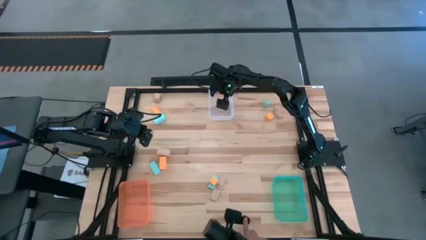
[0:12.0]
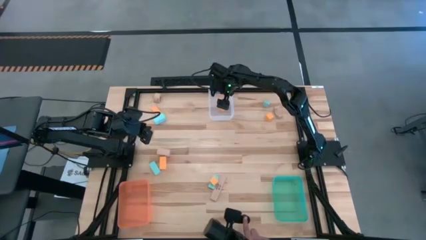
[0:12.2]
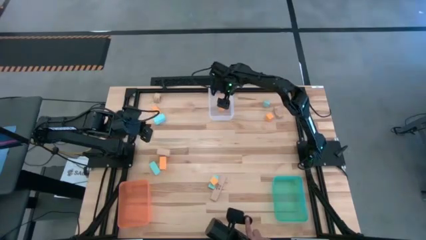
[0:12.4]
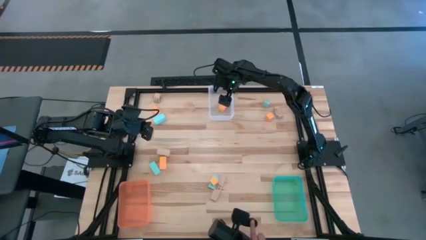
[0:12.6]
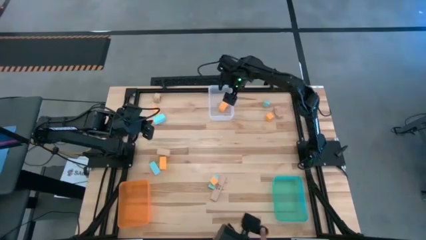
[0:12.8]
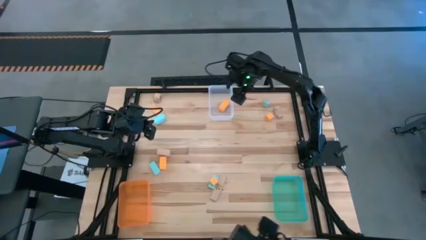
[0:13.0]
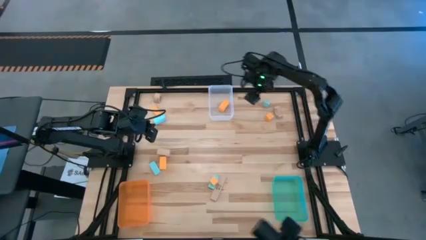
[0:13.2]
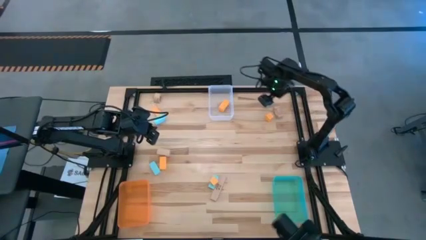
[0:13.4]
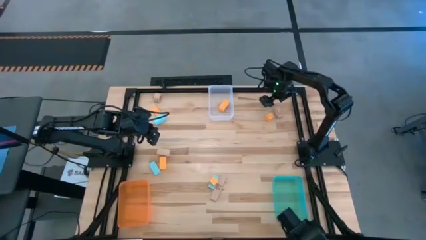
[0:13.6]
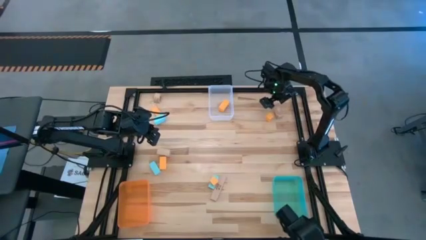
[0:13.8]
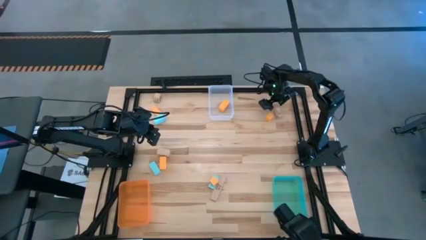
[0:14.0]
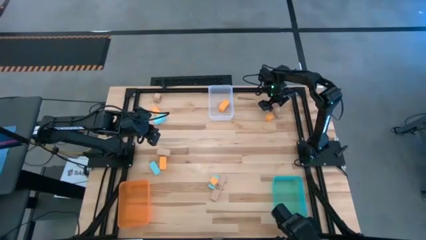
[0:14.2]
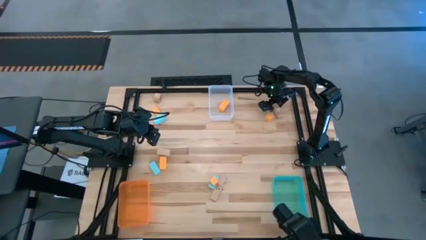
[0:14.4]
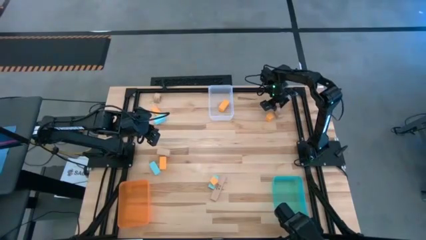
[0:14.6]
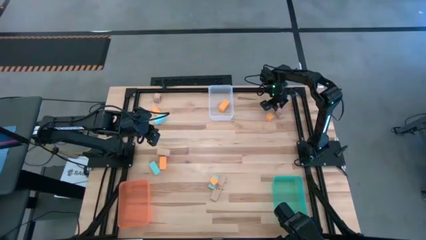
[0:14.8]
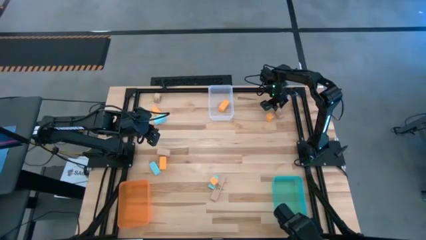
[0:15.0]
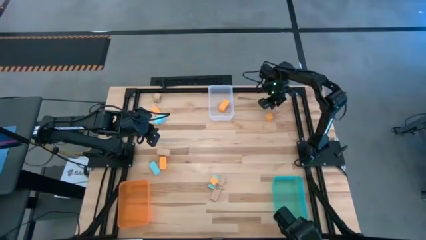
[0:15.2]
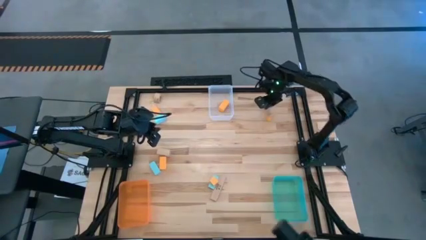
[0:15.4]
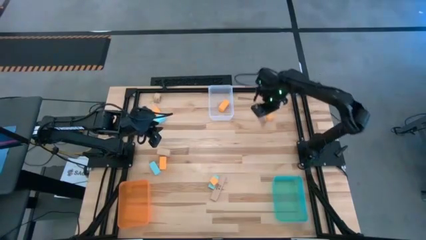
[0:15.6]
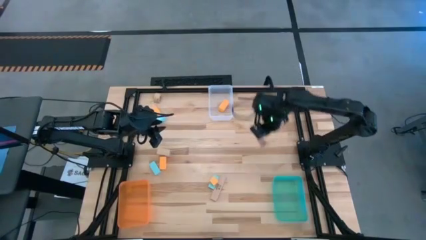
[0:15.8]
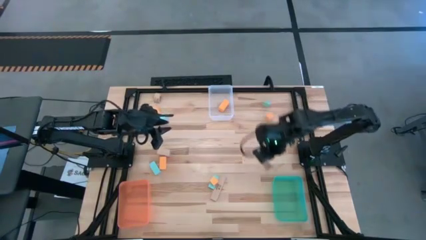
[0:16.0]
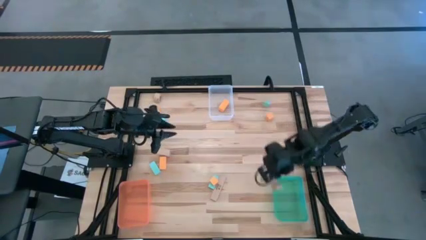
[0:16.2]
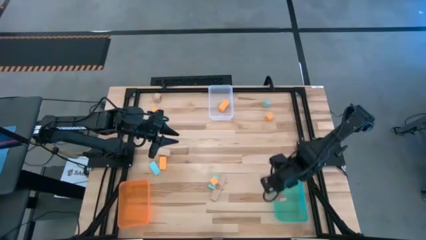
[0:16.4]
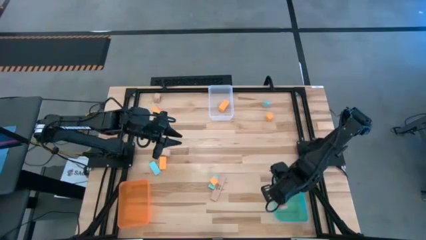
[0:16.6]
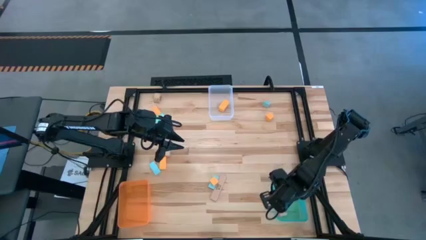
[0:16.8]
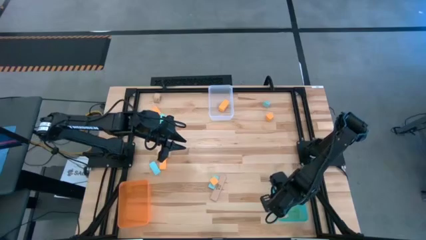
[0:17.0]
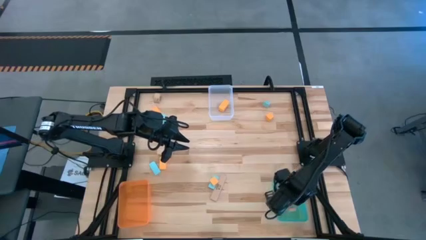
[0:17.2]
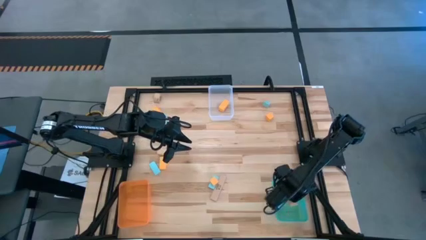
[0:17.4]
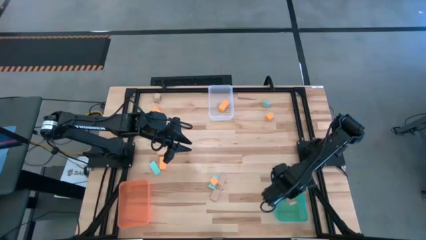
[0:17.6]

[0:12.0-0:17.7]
Task: Sort & place blocks by color
Put the light brown block into the transparent blue bin

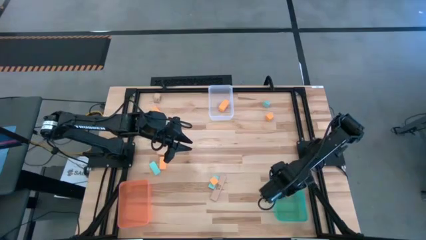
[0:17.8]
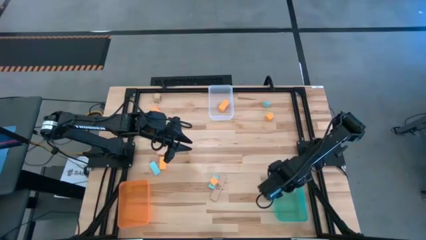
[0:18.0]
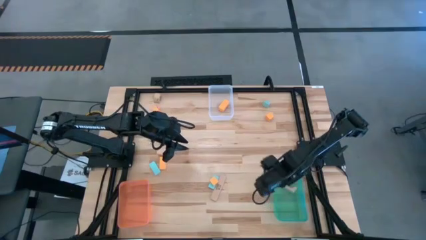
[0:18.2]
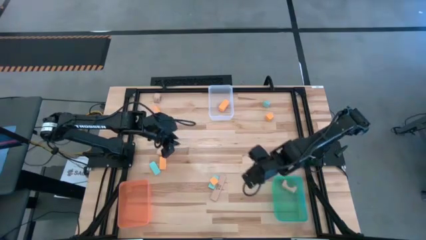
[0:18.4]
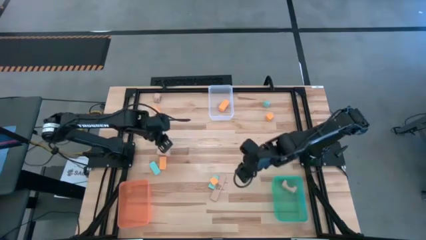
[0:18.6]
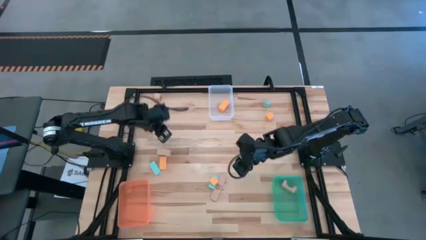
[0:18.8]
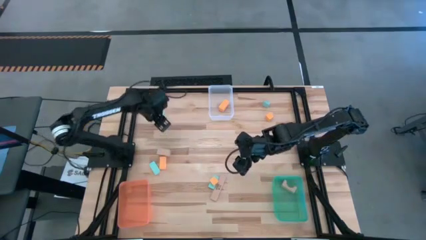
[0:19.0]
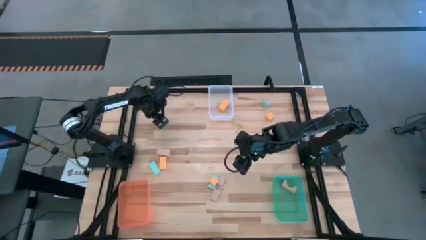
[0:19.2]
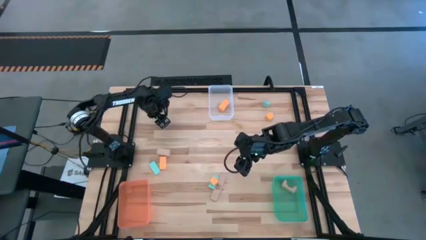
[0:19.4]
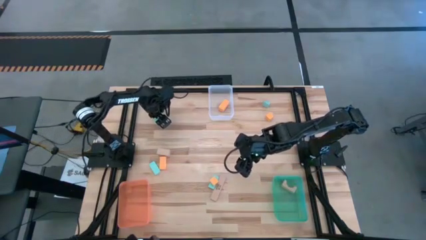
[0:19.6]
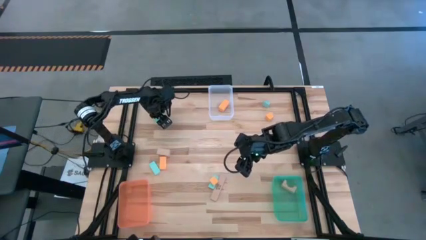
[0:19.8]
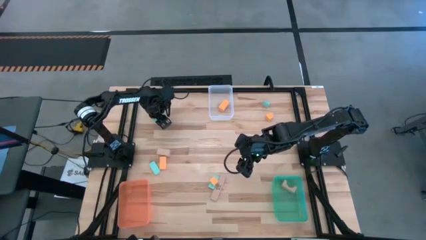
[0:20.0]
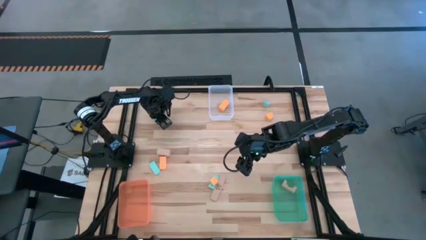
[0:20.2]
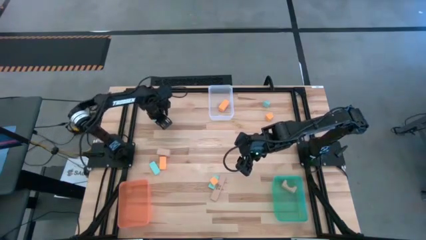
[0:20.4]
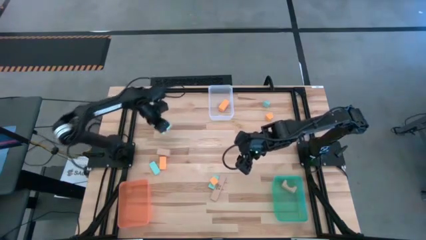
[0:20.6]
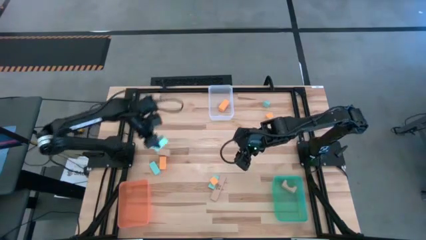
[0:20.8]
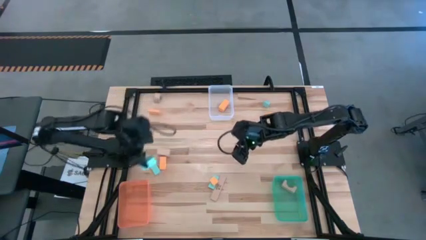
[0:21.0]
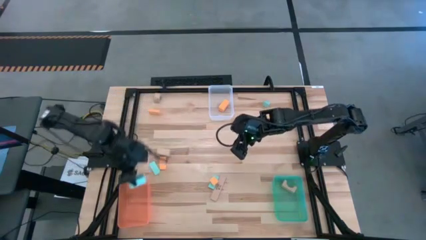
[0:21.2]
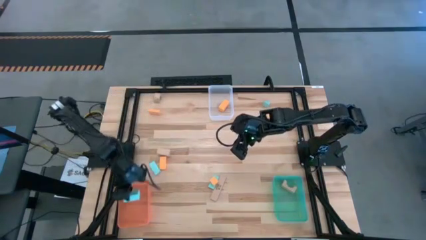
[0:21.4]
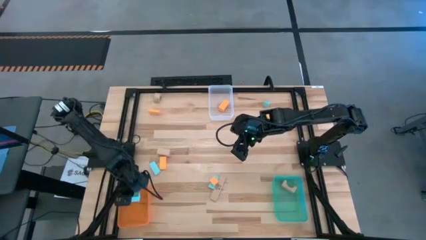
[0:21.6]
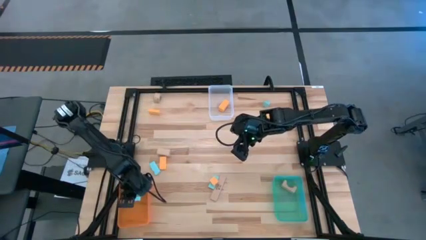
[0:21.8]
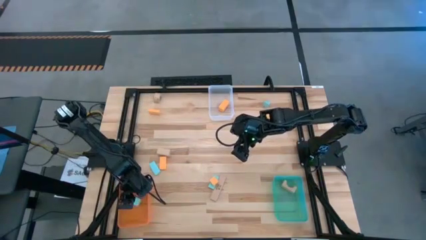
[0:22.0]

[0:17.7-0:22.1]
Put the sky blue block into the transparent orange bin

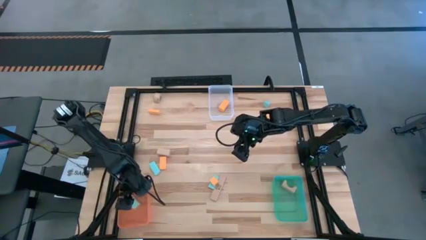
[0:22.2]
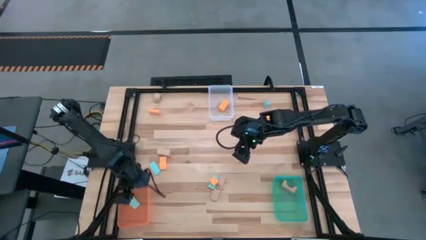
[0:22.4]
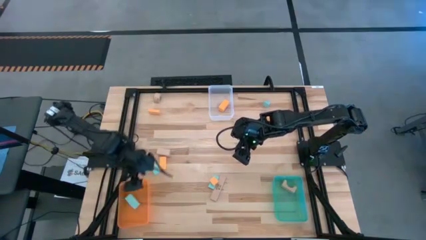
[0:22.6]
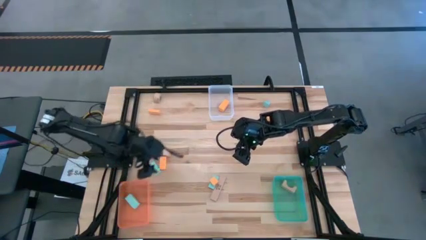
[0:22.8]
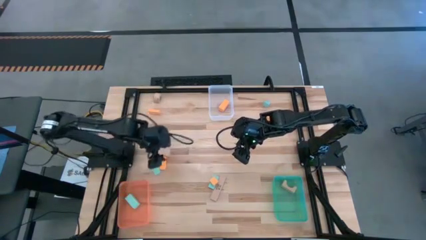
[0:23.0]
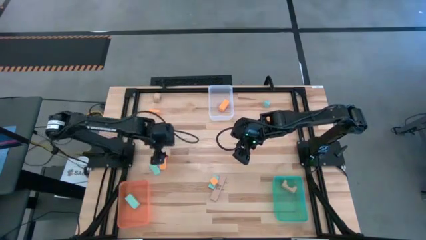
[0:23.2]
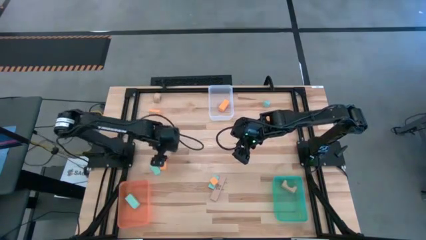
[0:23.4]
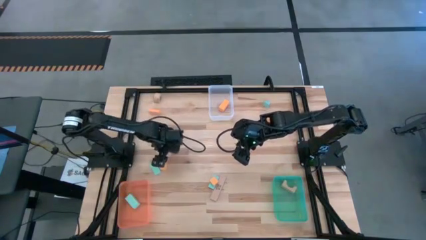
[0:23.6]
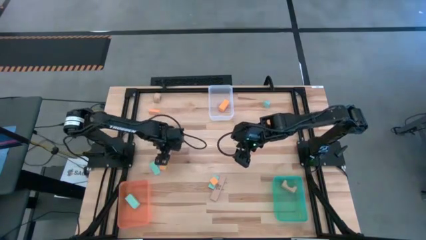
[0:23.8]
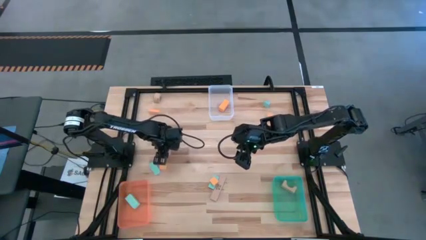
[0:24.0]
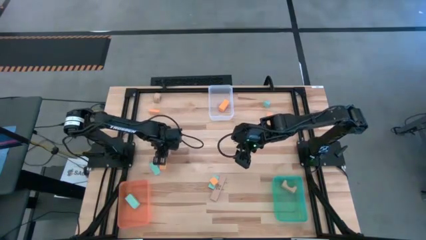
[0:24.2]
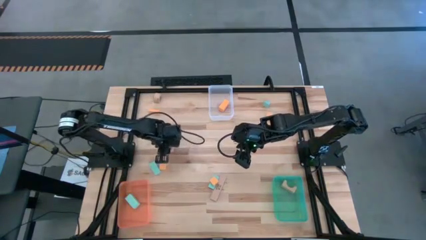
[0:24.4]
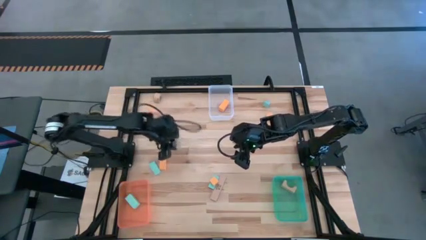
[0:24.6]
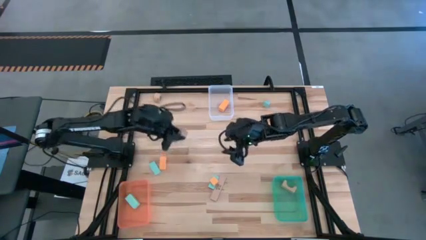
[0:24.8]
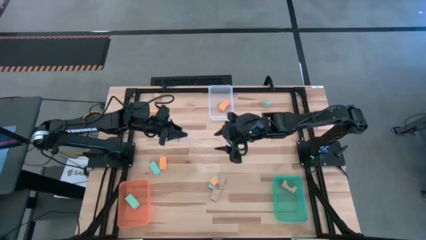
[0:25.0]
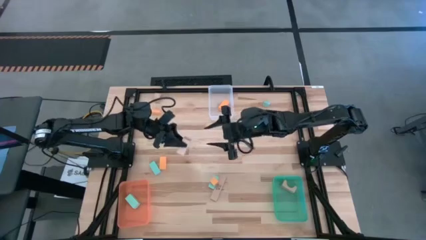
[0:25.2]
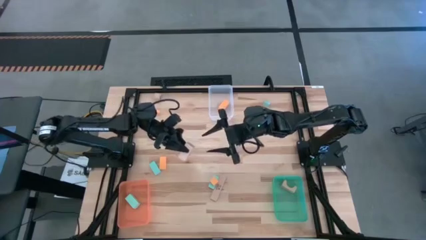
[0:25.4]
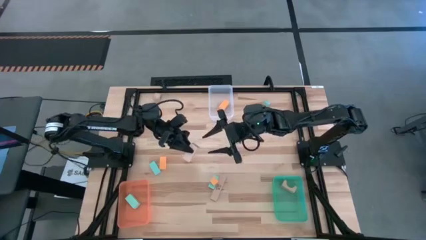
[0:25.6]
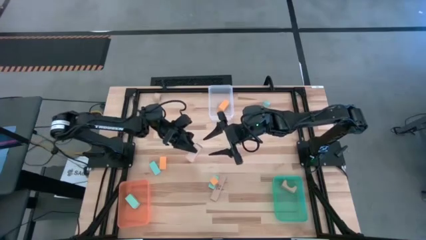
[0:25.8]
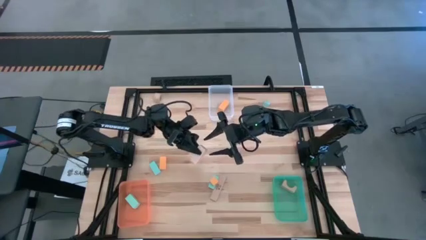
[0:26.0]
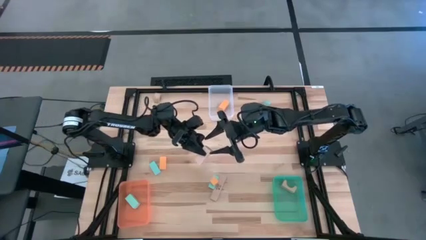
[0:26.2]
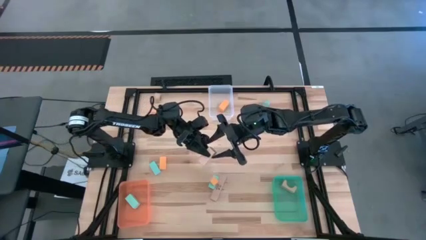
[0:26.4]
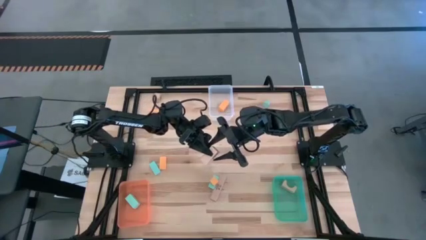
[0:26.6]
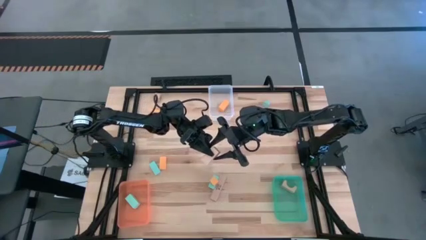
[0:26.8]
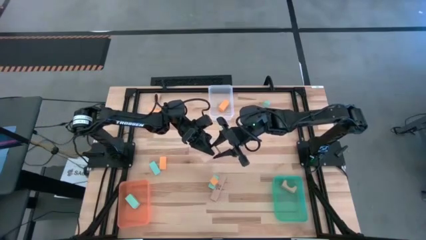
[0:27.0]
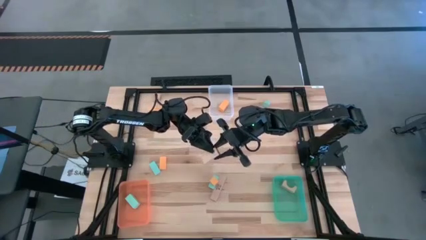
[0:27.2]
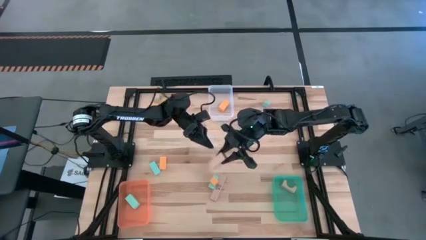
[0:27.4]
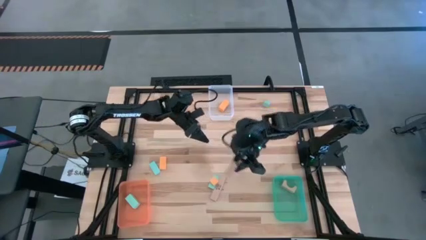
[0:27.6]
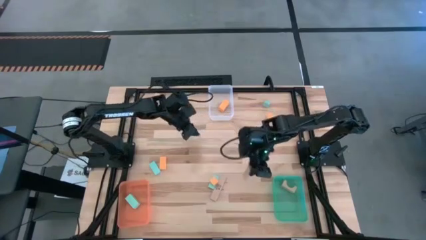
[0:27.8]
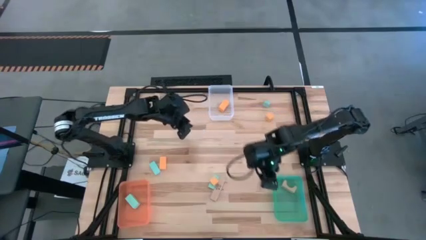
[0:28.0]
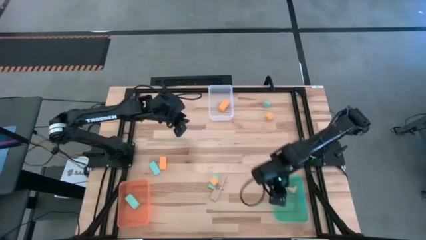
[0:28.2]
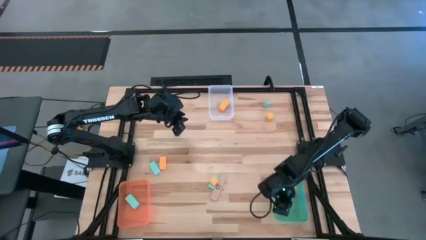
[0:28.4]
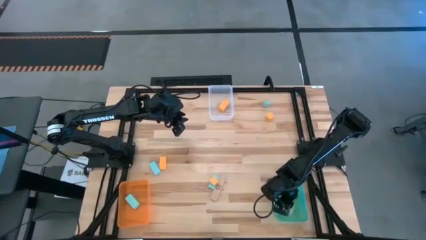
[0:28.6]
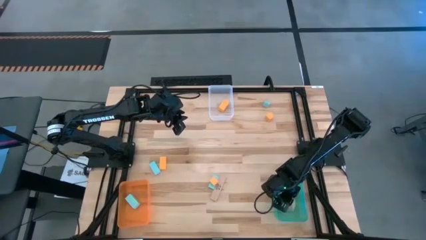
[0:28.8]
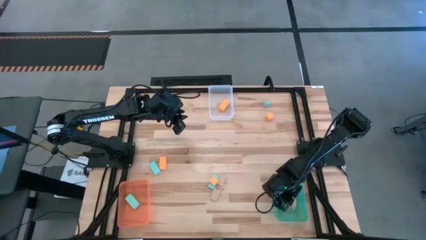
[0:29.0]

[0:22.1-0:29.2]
Put the light brown block into the transparent blue bin
